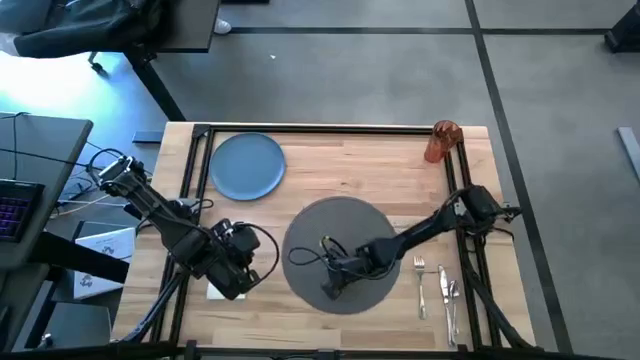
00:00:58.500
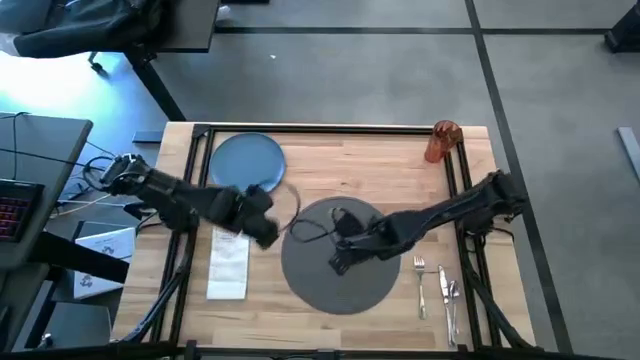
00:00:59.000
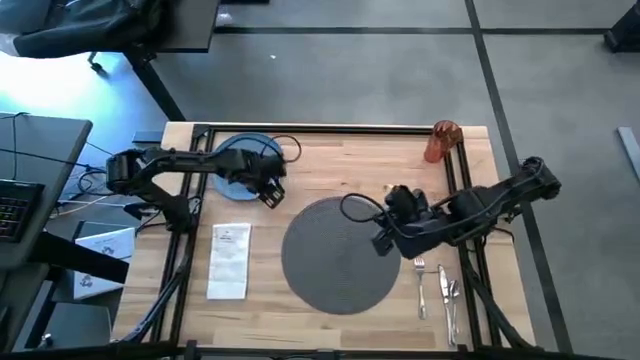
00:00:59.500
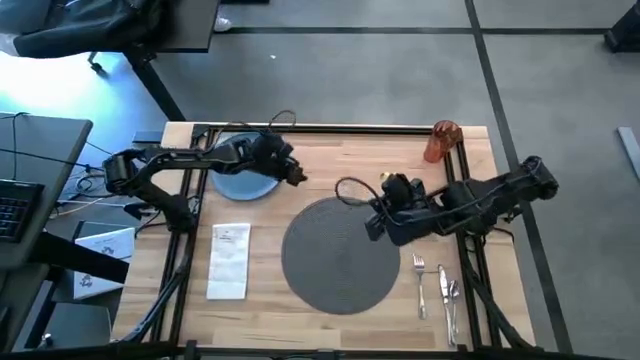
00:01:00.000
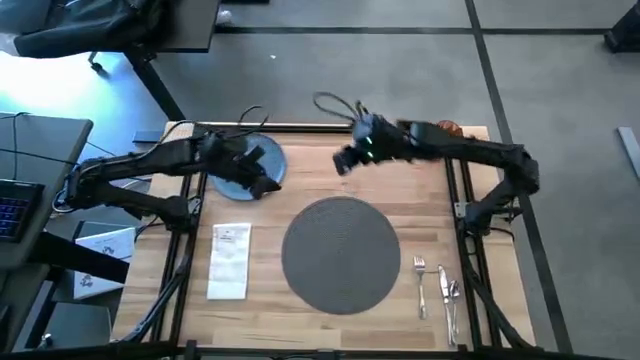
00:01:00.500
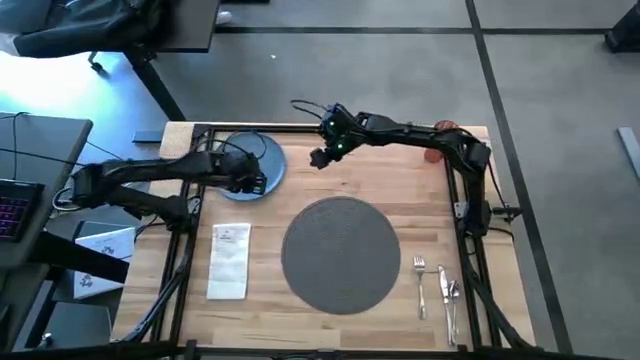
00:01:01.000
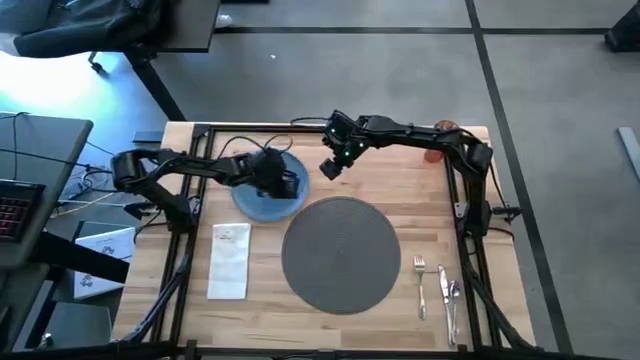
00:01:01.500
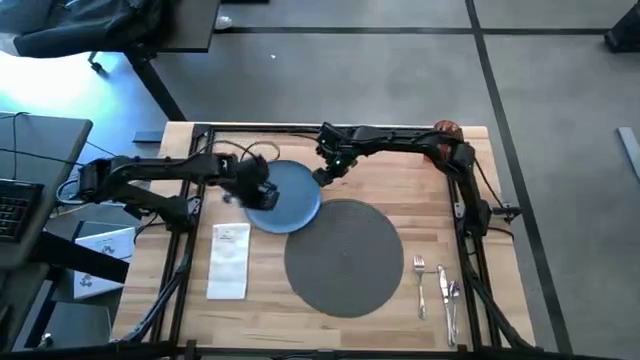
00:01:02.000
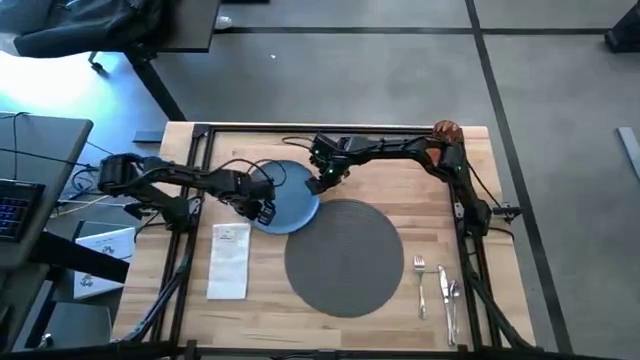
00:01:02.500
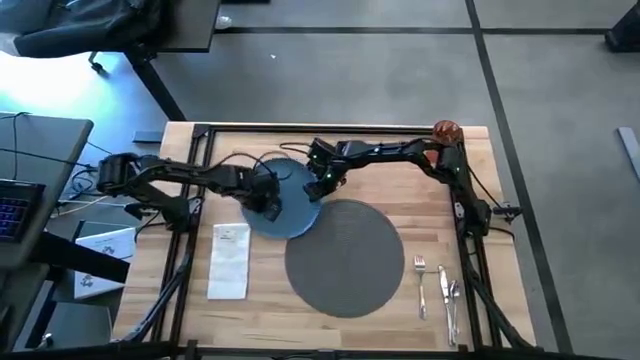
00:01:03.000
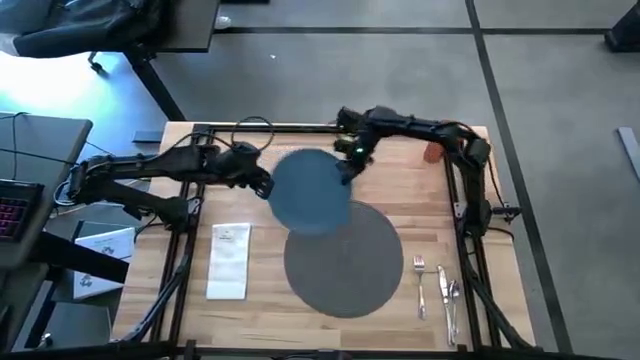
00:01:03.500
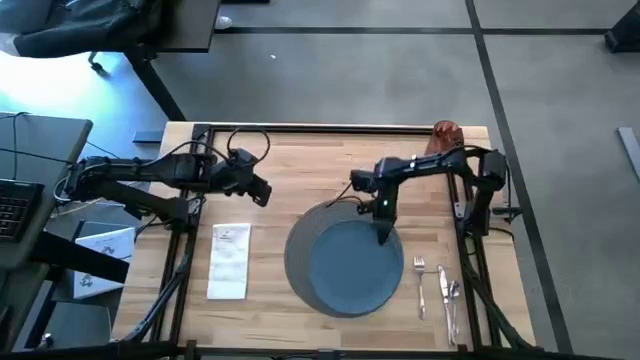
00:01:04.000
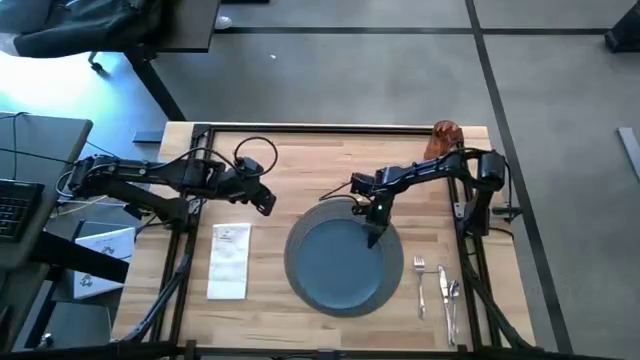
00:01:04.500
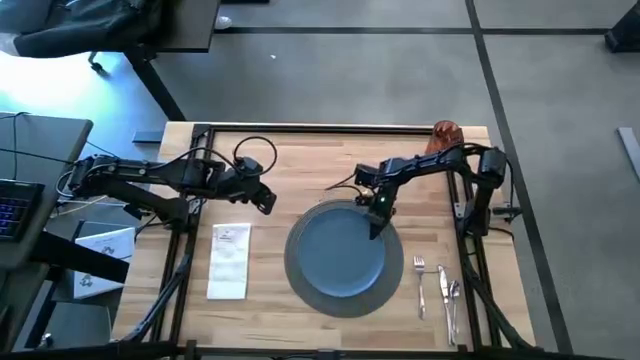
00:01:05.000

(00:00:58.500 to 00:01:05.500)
Task: Set table place
Put the blue plate on the gray table mat

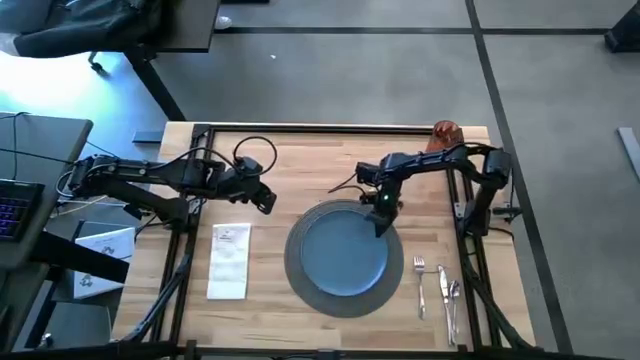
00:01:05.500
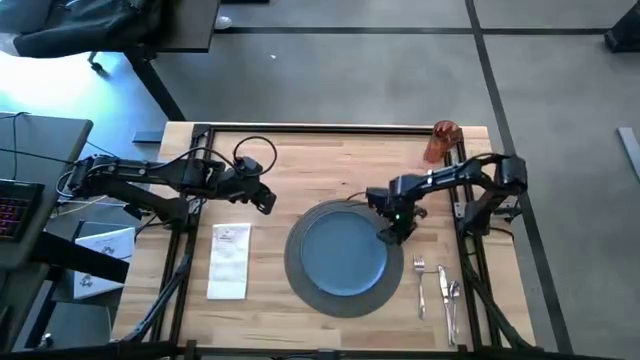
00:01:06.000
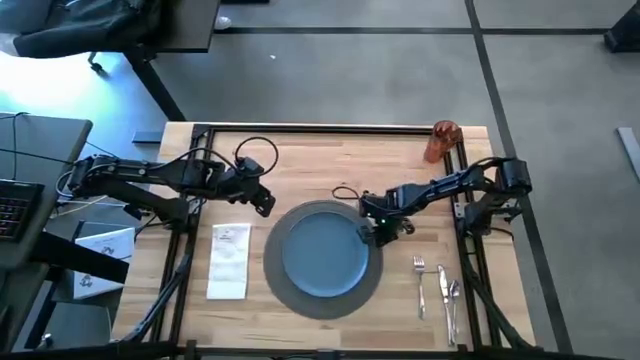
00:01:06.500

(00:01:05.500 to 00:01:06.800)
Adjust the gray table mat

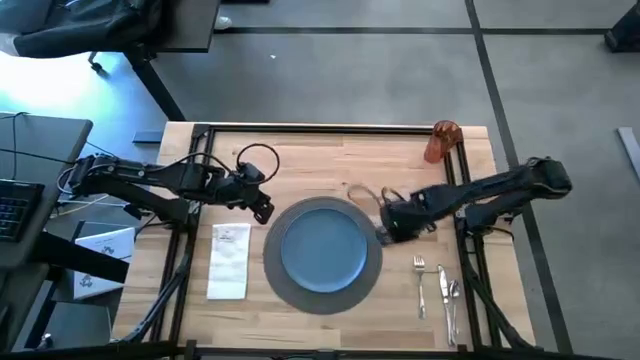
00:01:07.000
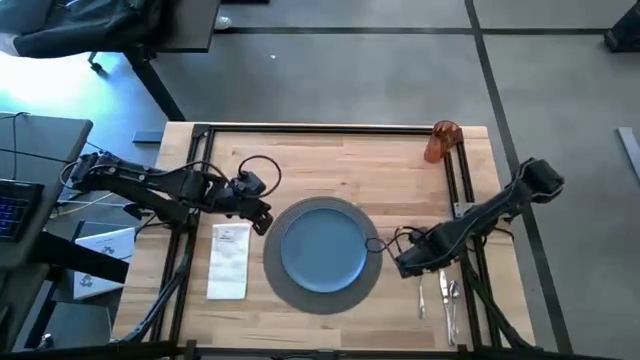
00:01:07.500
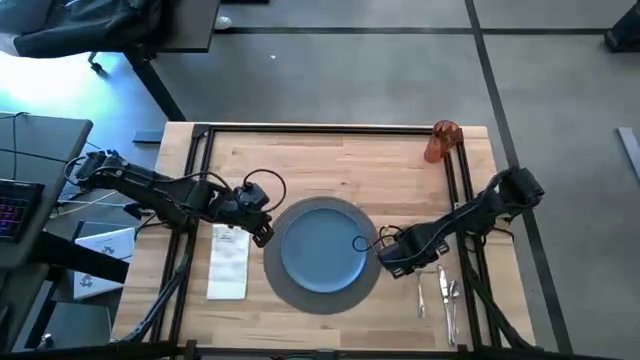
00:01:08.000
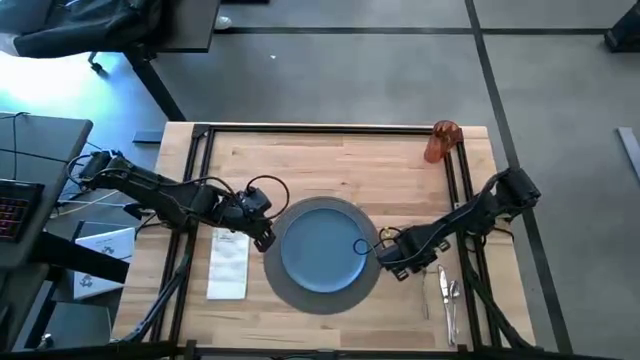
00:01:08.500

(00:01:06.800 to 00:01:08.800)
Put the silver fork on the white table napkin

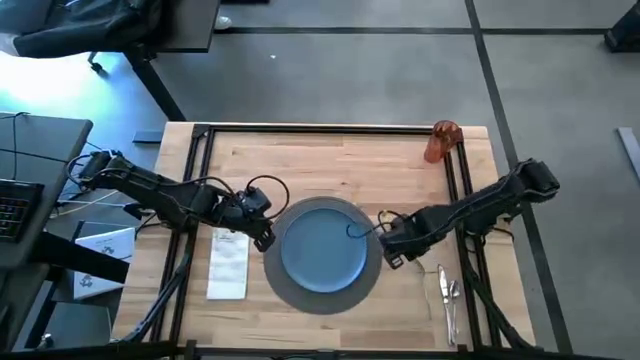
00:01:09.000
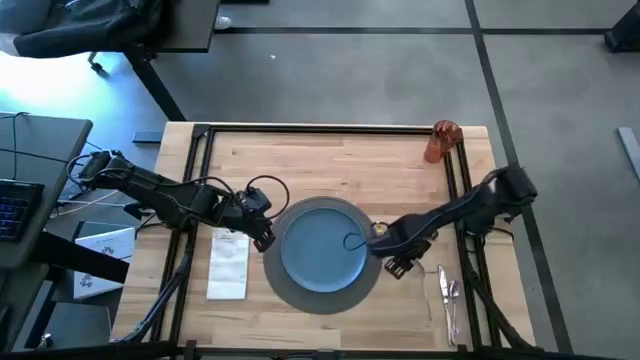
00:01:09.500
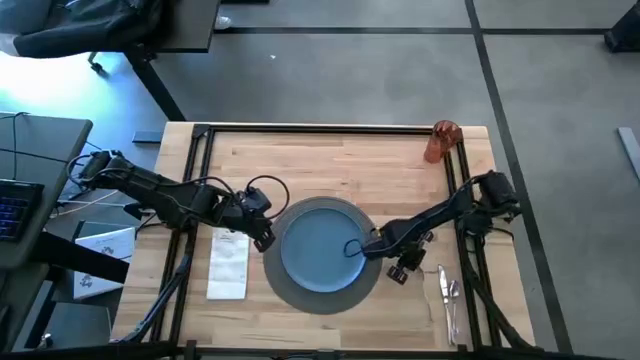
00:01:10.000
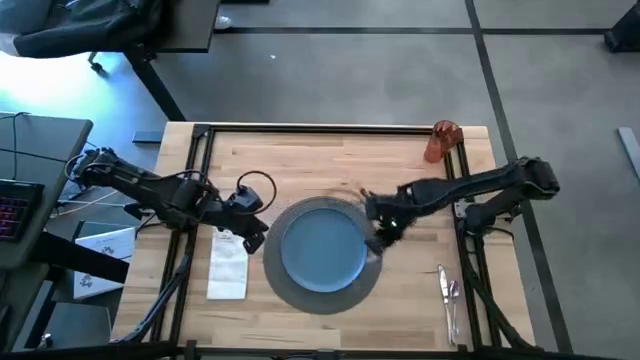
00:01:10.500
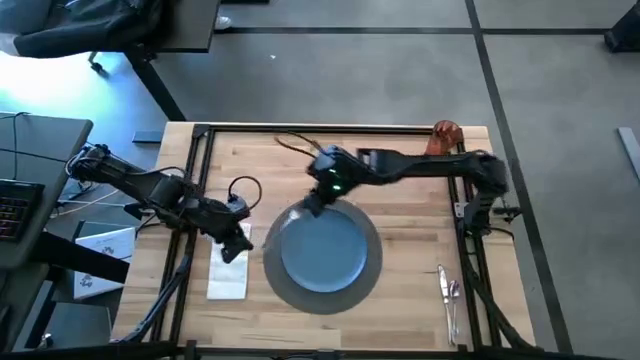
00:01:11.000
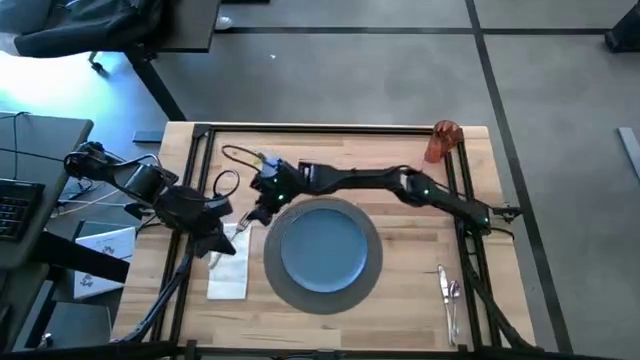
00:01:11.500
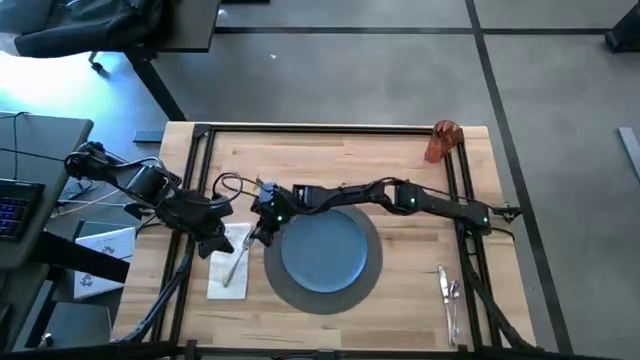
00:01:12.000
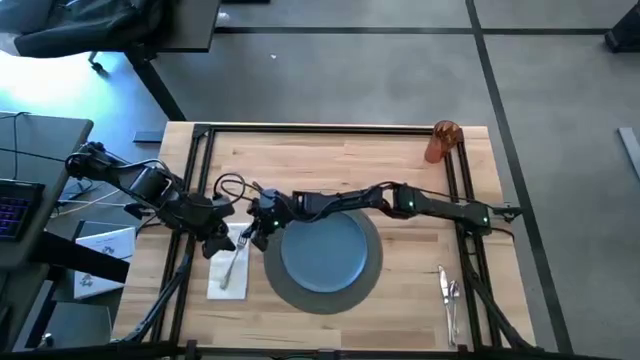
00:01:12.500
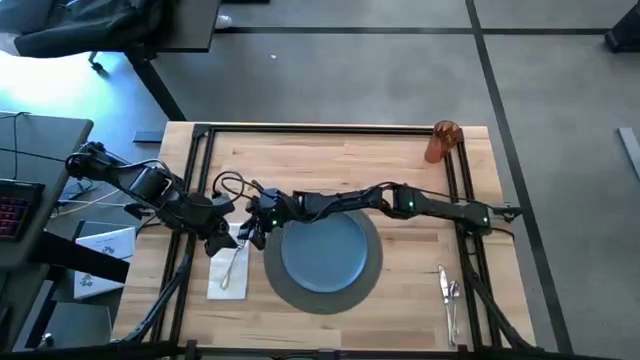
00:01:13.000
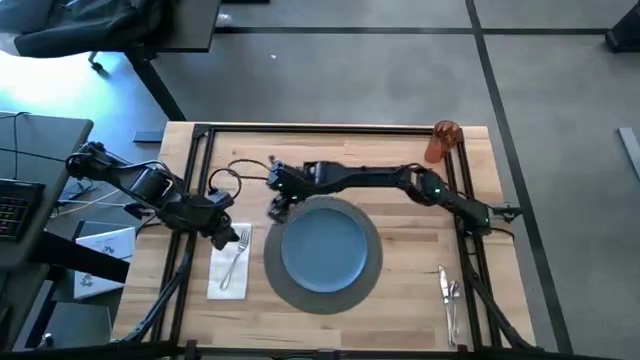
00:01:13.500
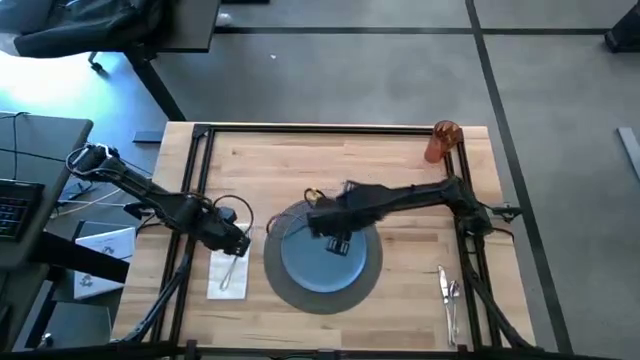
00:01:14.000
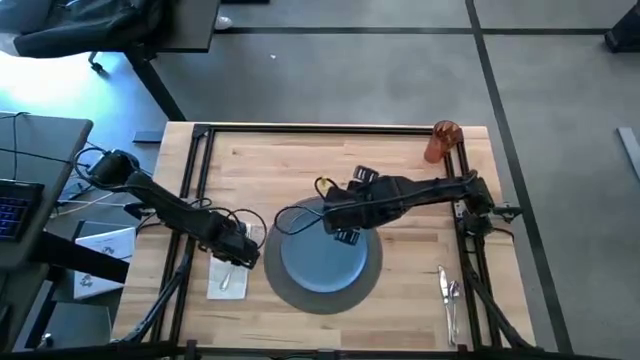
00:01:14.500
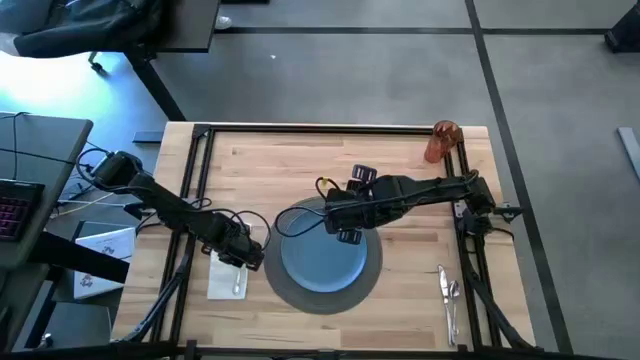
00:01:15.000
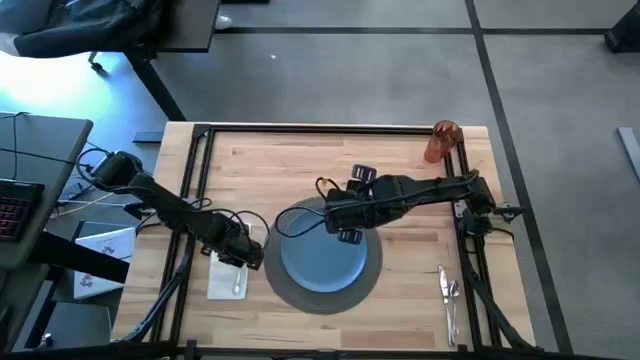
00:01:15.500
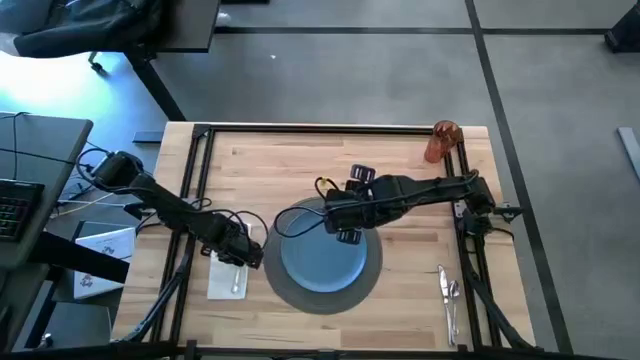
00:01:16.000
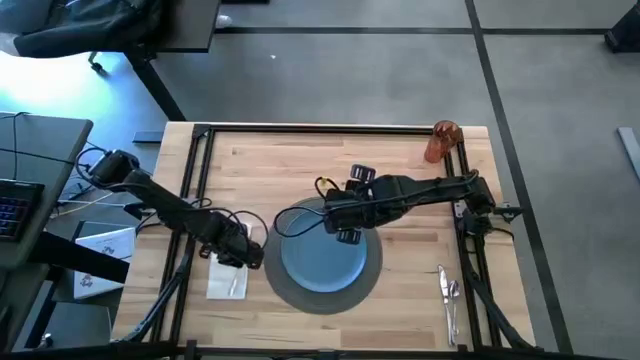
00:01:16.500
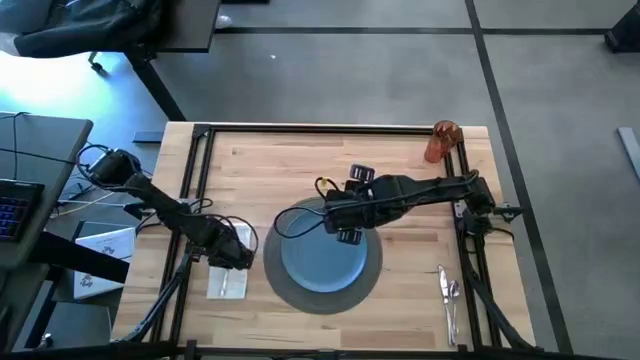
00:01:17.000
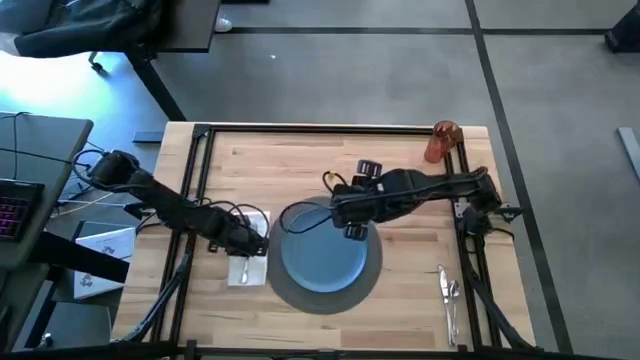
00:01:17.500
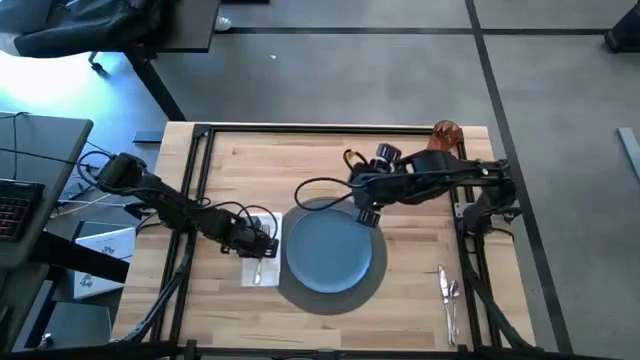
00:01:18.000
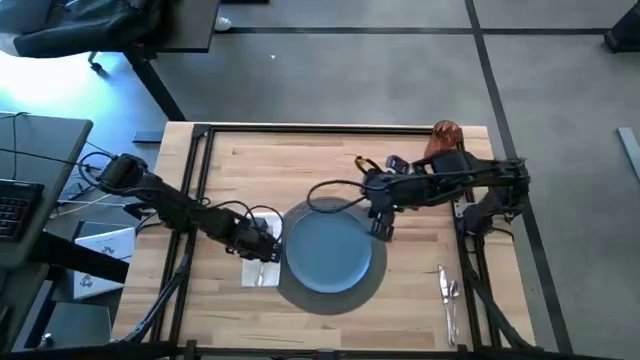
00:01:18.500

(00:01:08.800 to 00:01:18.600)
Put the silver fork on the white table napkin
